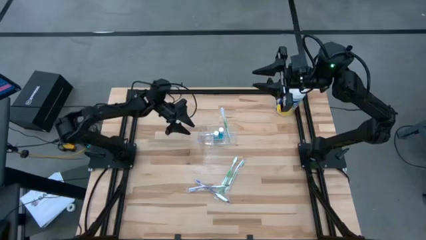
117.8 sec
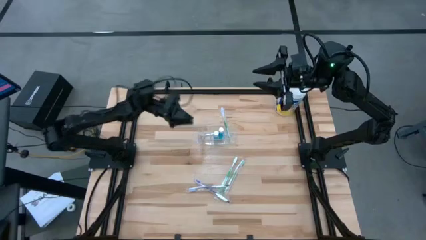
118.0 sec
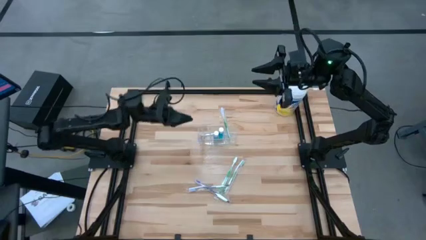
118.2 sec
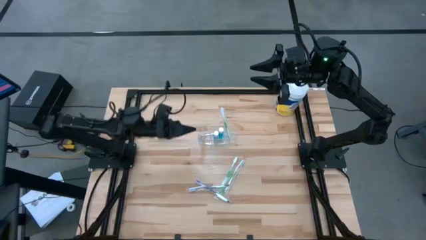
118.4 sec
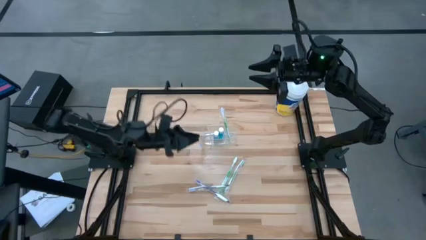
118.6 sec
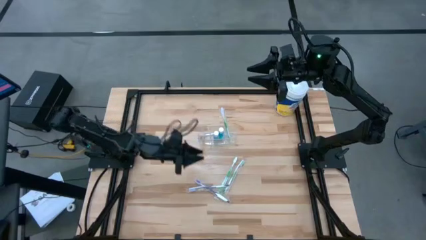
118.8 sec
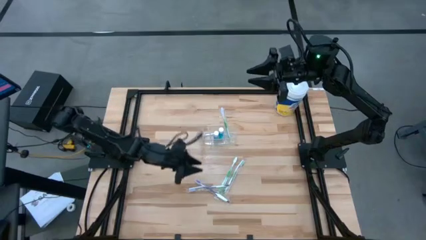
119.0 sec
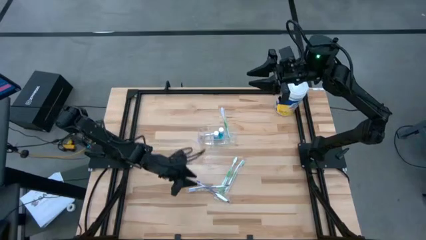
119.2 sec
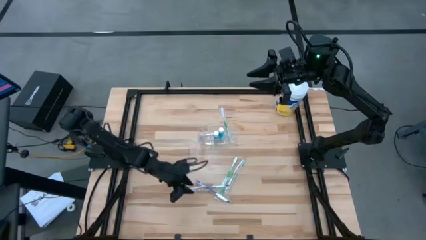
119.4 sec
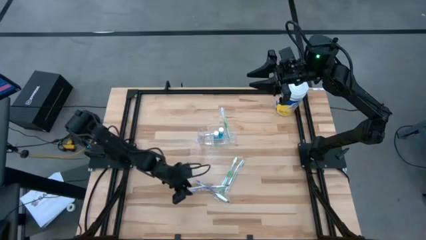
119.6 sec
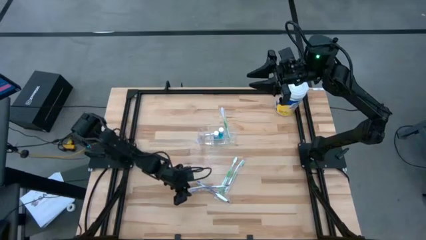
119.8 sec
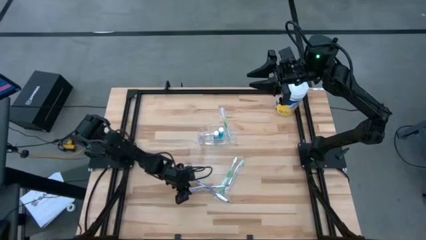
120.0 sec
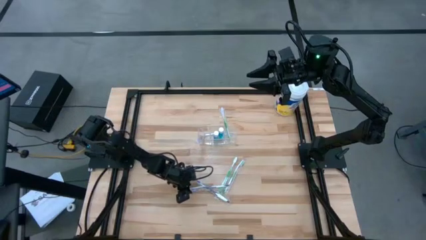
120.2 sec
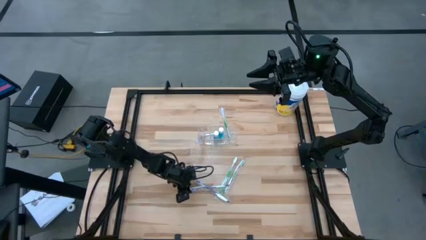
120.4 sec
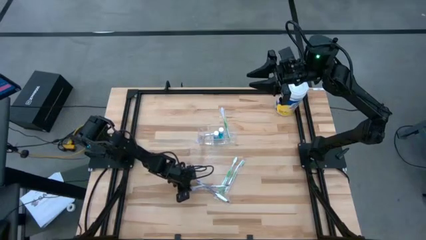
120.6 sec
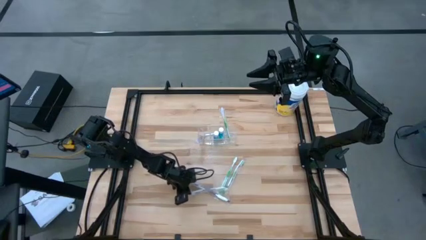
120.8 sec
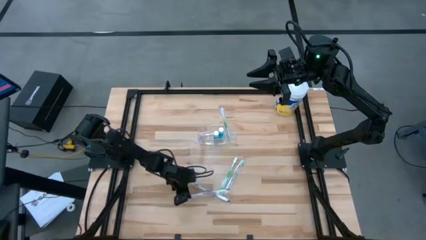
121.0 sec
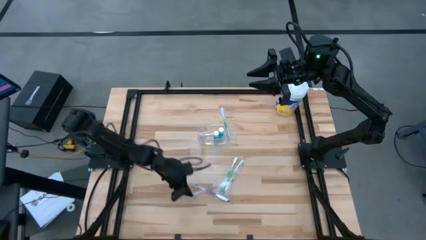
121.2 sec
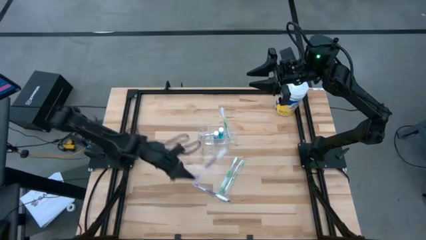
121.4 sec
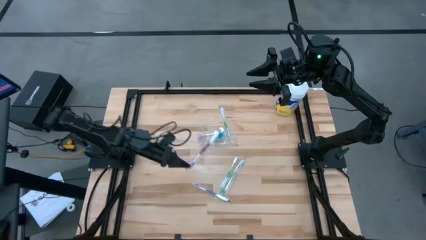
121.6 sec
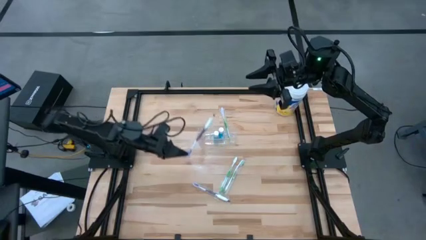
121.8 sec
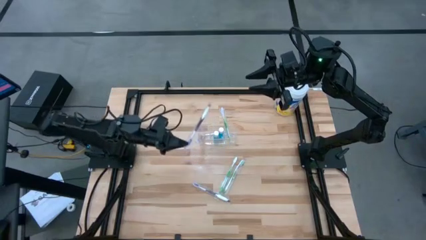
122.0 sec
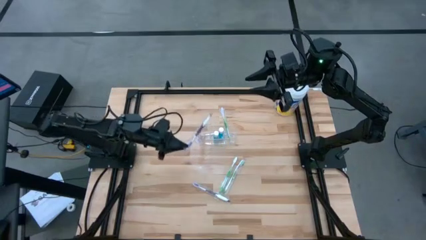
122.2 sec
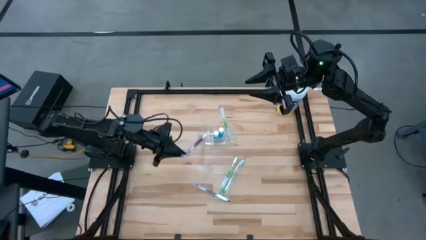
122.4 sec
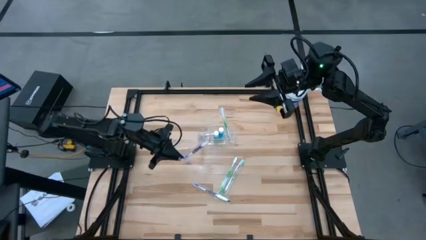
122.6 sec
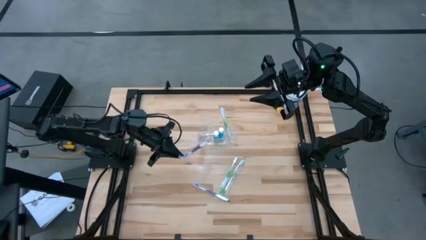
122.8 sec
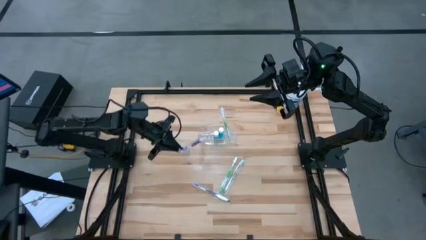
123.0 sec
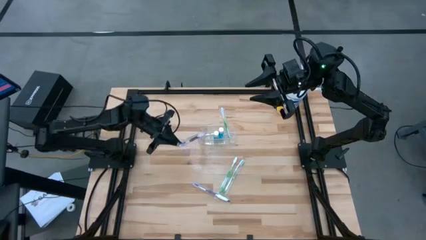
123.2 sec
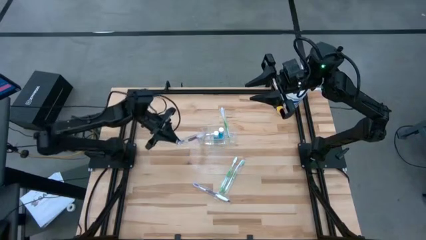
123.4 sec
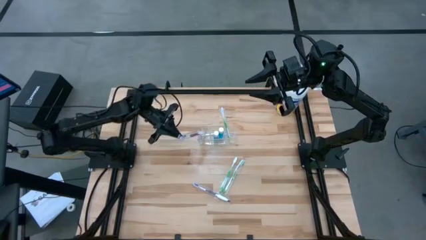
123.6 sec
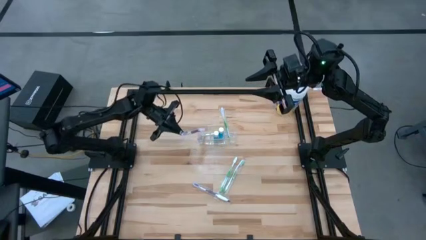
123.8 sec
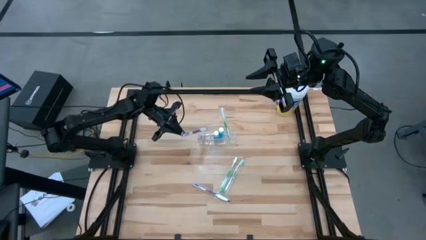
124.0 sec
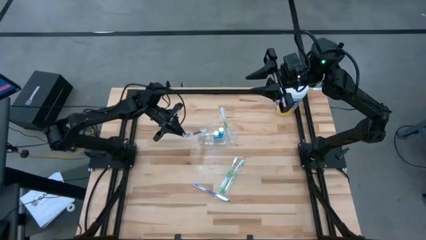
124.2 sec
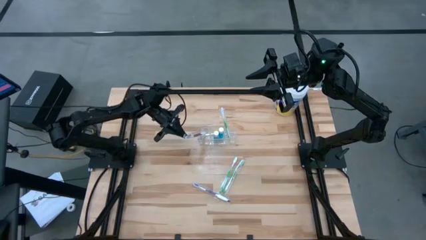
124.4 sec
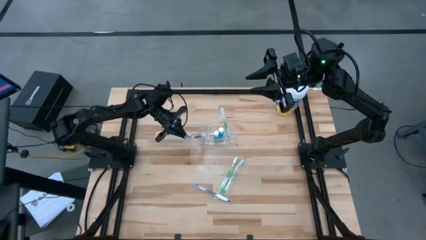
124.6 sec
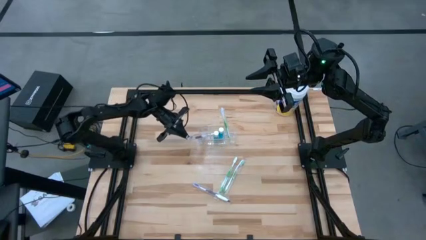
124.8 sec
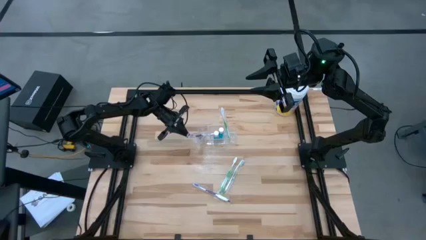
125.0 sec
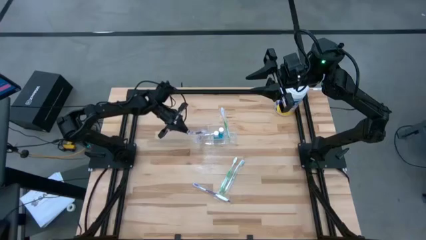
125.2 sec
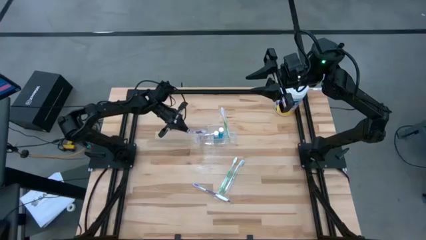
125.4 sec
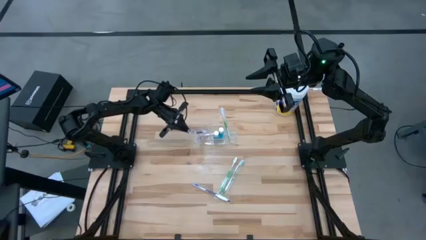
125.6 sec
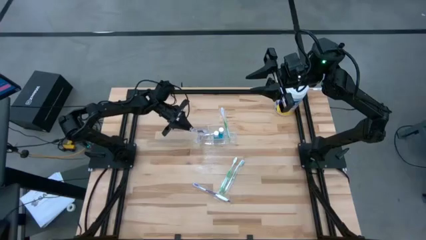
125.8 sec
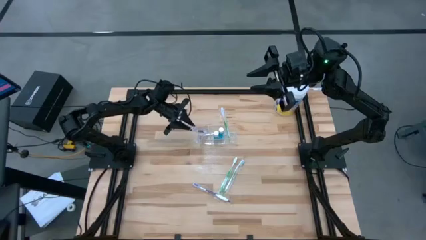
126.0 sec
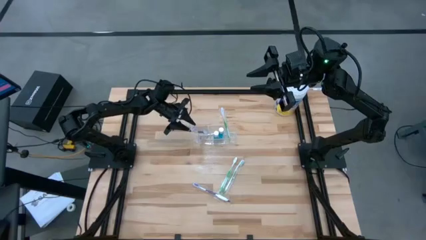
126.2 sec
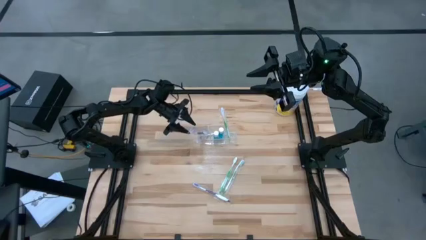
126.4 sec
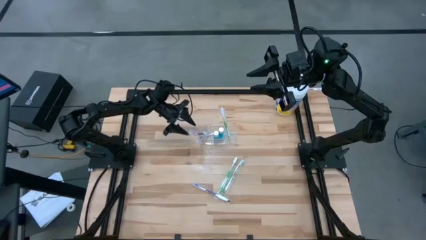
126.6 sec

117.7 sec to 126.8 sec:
Task: Pick & Place toothbrushing station
Put the bottom purple toothbrush into the transparent organizer

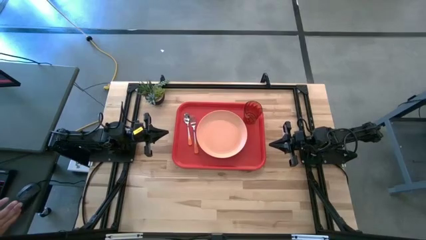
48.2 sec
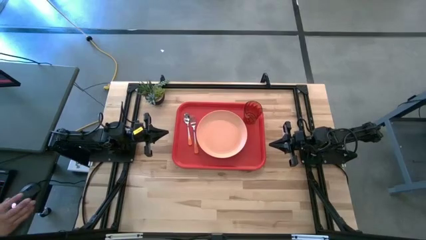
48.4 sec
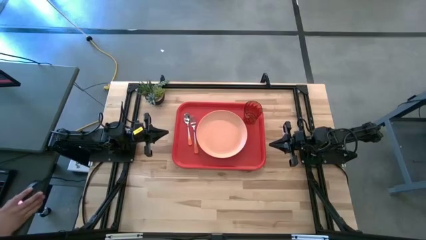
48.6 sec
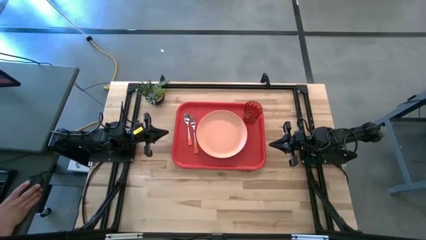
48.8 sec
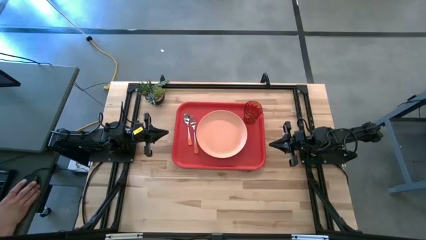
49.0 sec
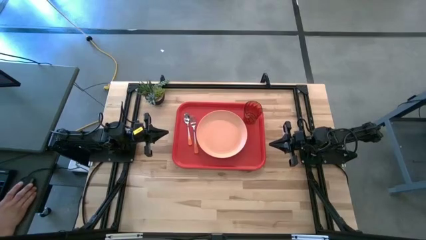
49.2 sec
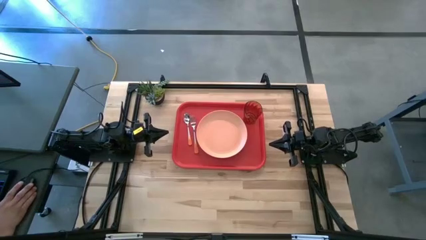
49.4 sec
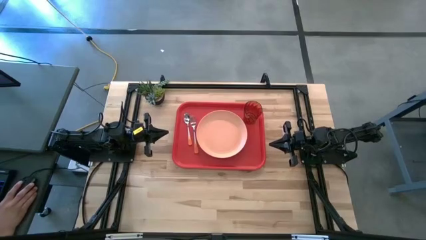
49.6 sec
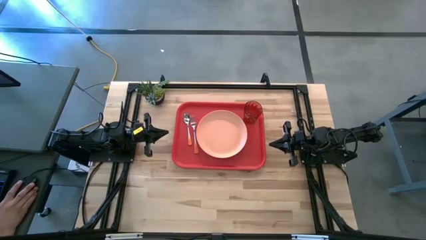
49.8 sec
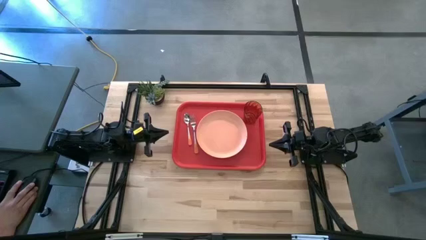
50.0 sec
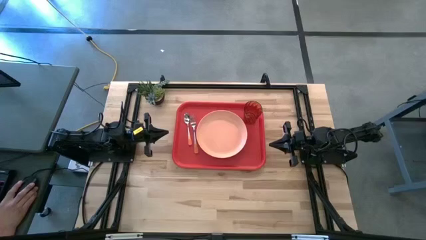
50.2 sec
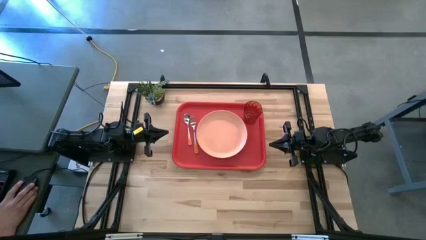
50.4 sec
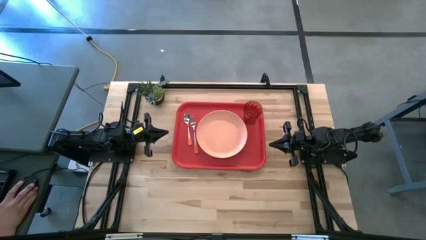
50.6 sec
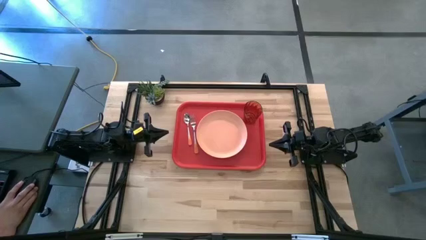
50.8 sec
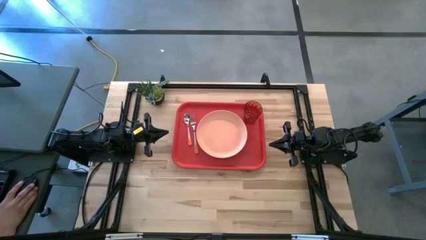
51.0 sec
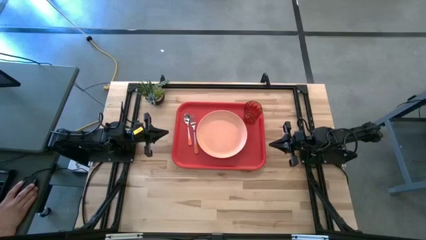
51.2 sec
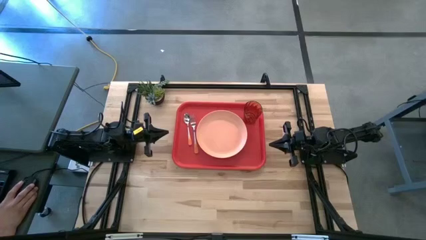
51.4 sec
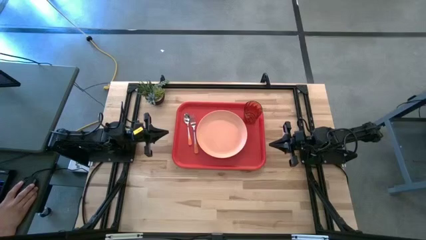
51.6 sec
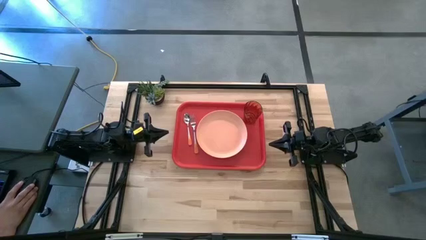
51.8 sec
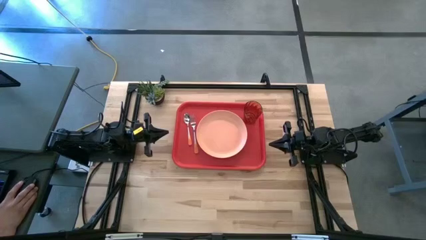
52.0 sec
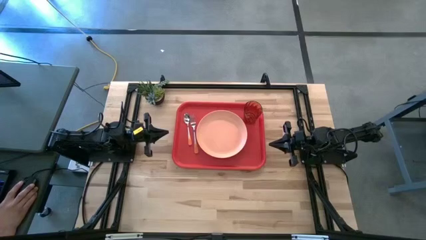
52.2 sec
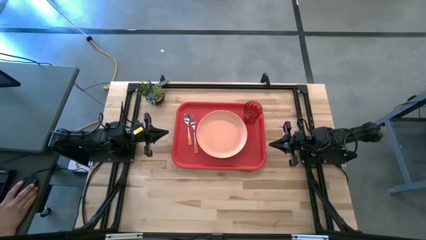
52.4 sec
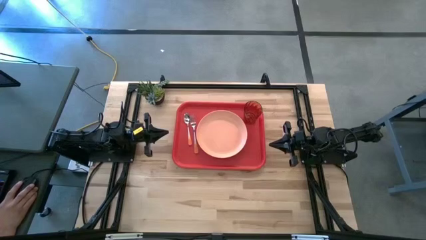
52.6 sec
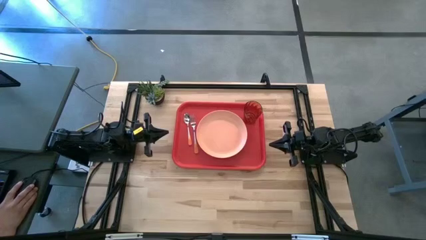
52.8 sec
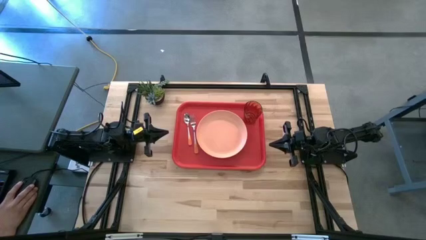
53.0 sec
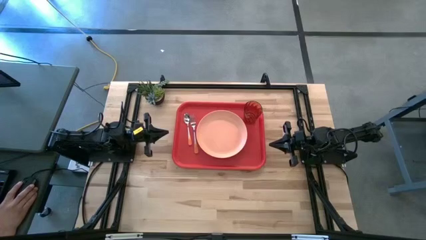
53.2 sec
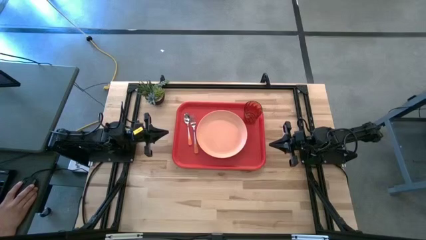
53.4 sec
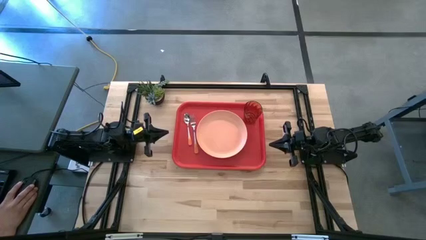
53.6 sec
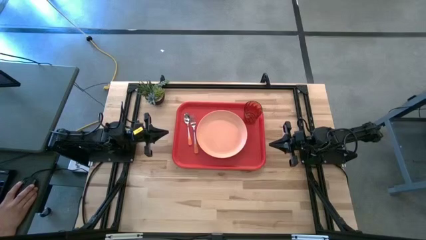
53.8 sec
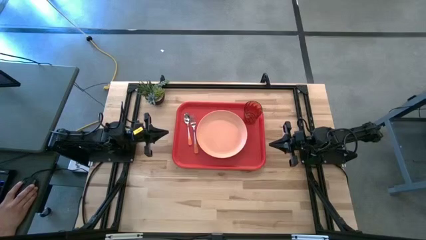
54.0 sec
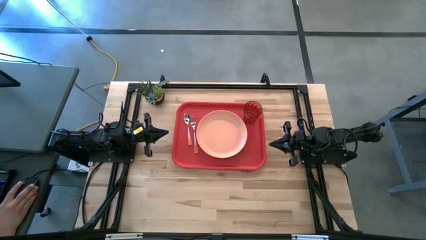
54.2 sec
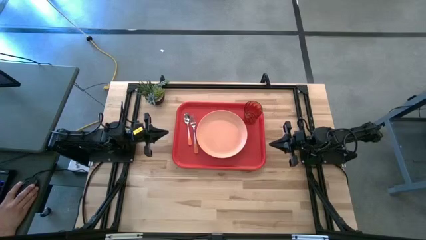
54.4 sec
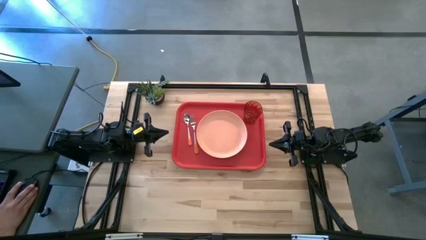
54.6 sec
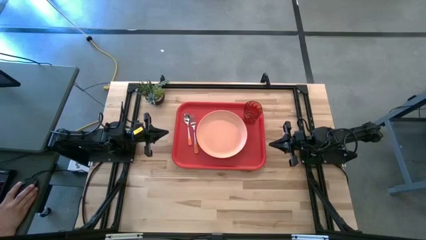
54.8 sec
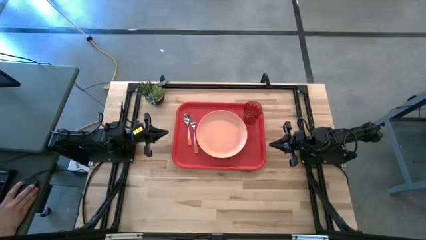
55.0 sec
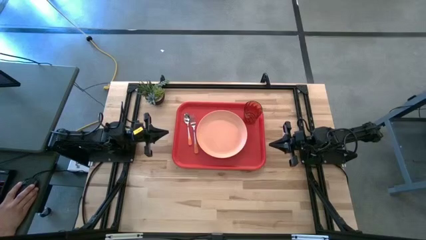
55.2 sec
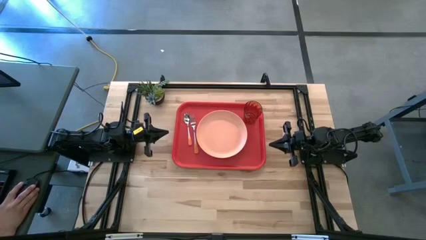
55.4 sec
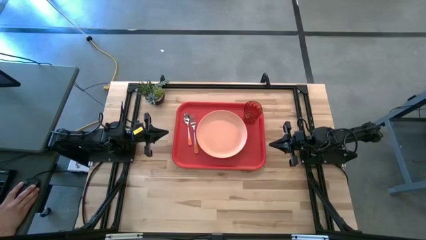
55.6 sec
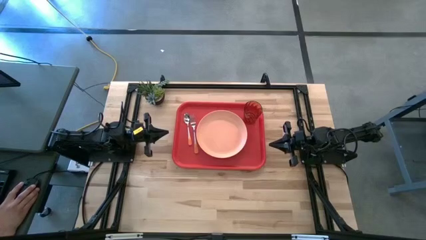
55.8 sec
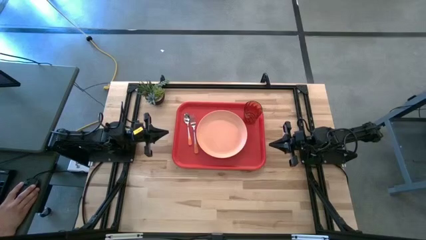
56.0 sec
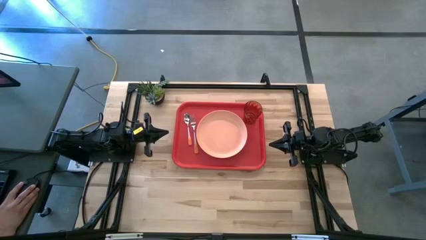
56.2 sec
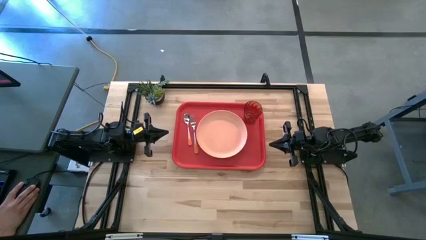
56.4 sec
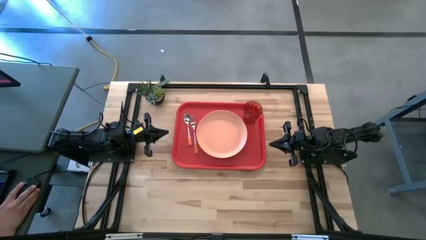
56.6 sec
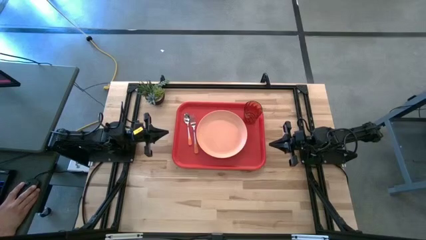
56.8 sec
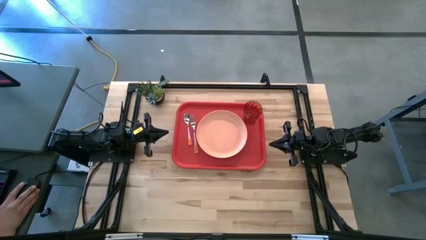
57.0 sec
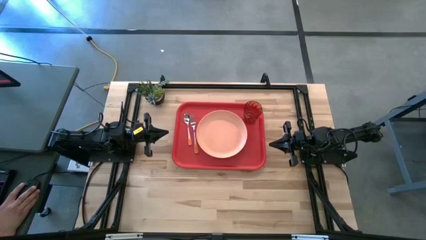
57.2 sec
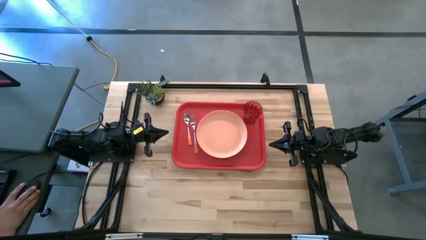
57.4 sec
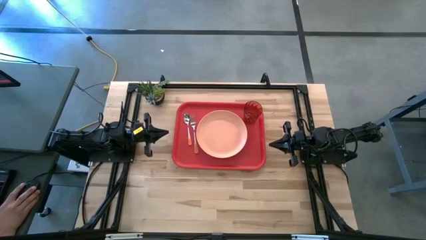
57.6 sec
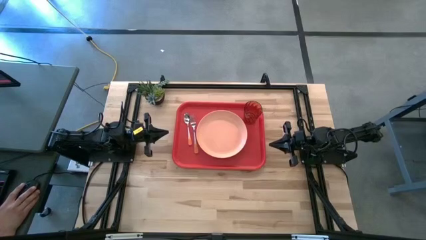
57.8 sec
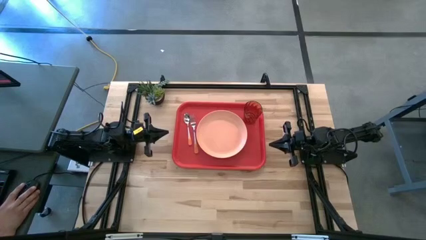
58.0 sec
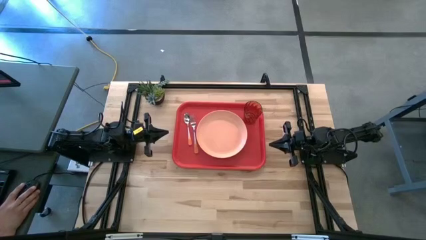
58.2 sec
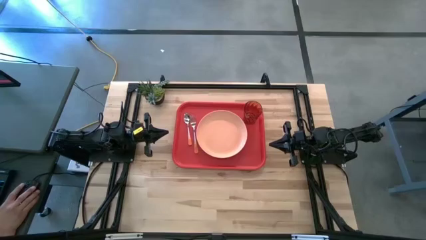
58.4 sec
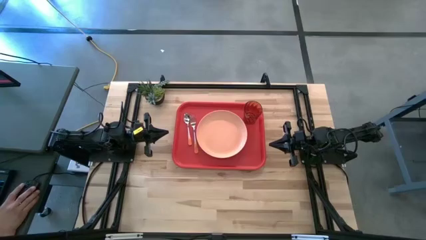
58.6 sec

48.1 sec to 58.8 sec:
Task: Pick and place plate/cup/fork/spoon on tray
Return to Home Position
